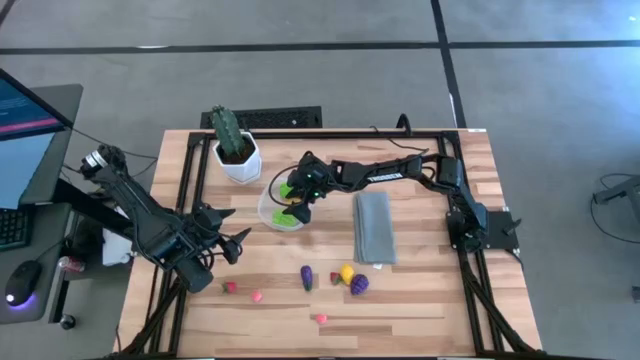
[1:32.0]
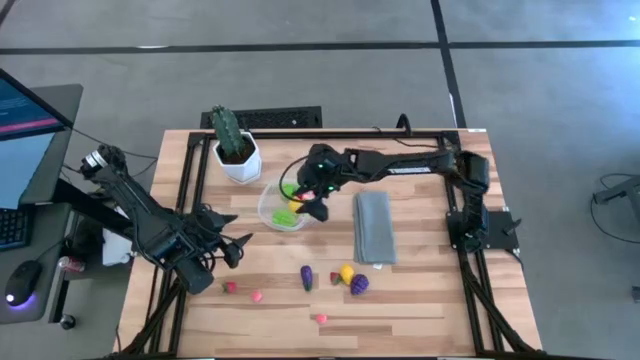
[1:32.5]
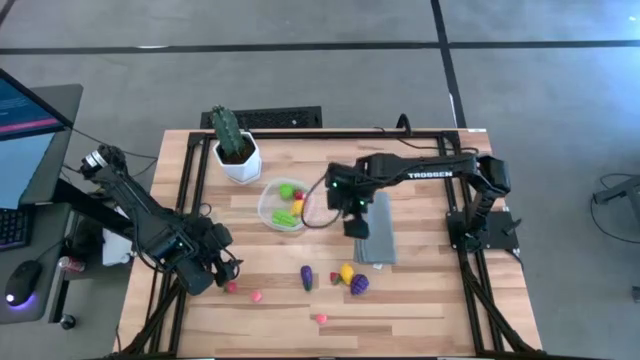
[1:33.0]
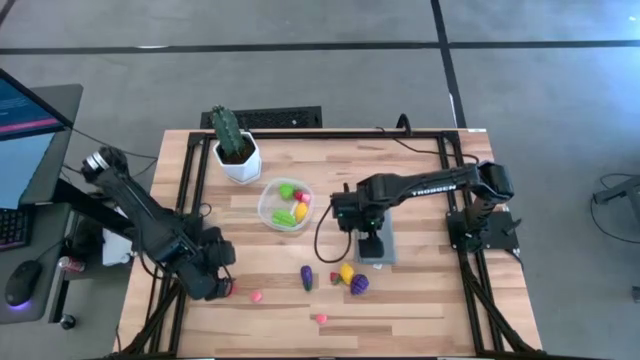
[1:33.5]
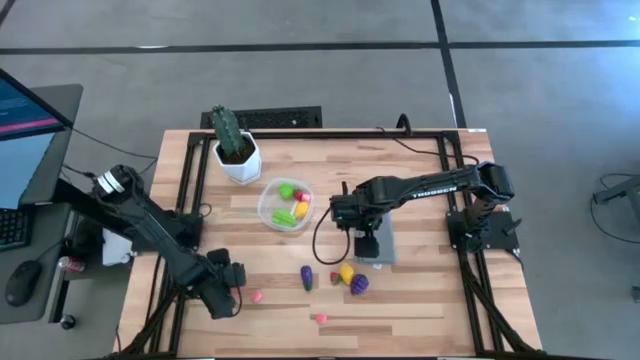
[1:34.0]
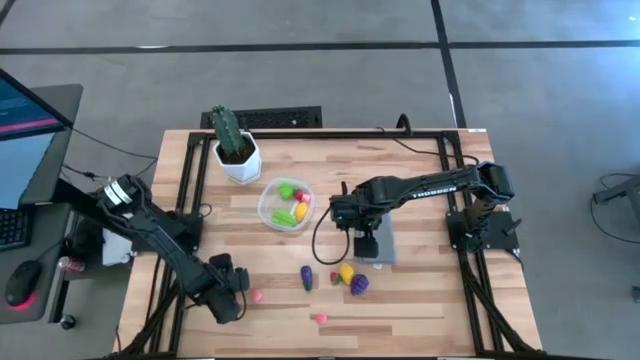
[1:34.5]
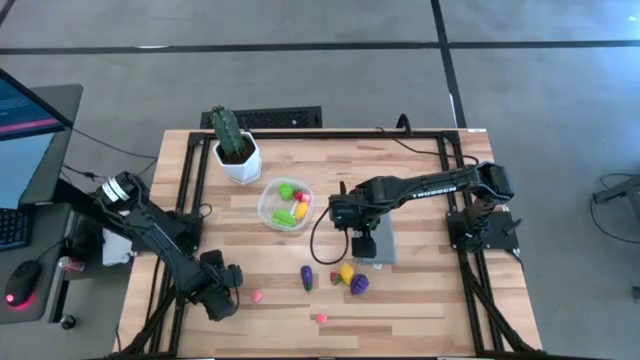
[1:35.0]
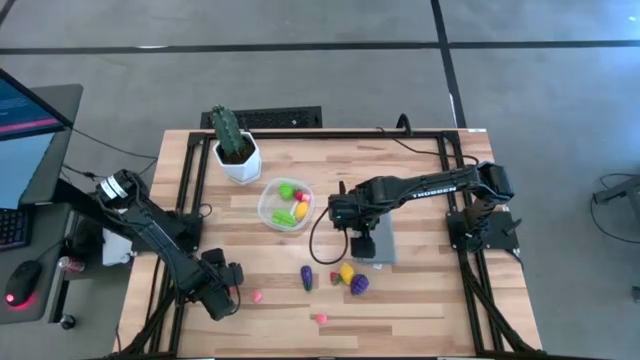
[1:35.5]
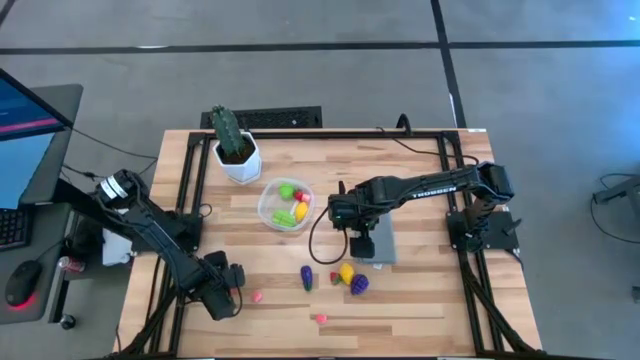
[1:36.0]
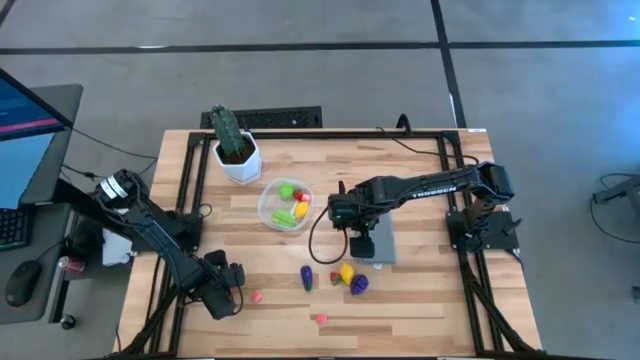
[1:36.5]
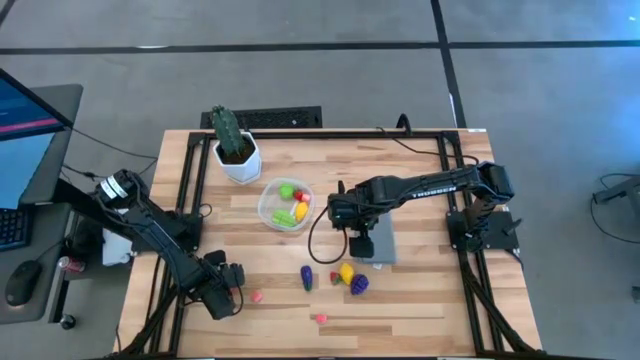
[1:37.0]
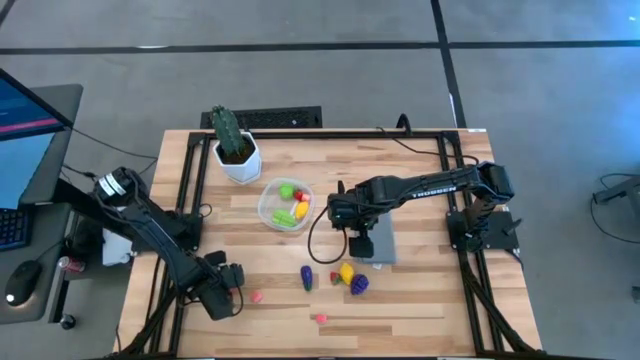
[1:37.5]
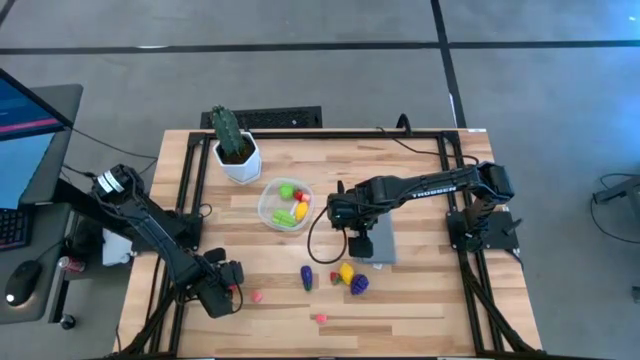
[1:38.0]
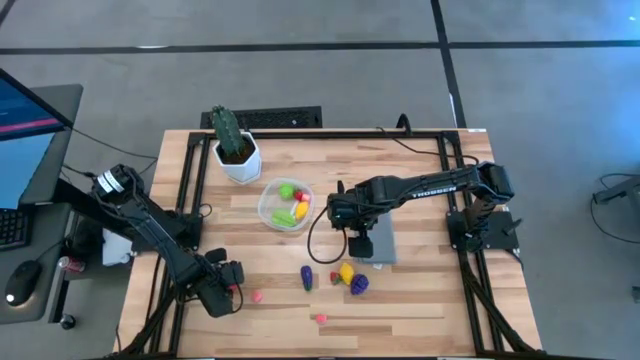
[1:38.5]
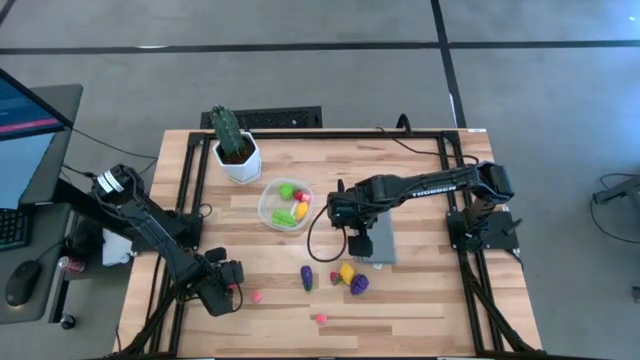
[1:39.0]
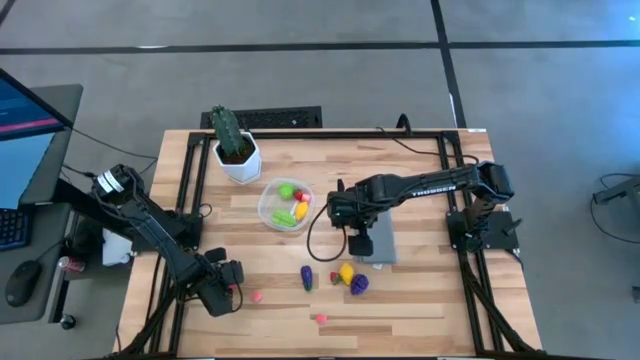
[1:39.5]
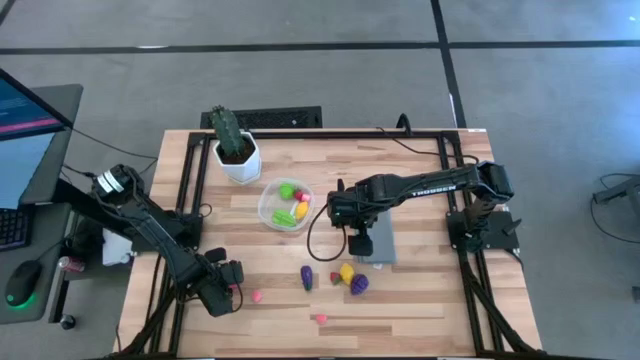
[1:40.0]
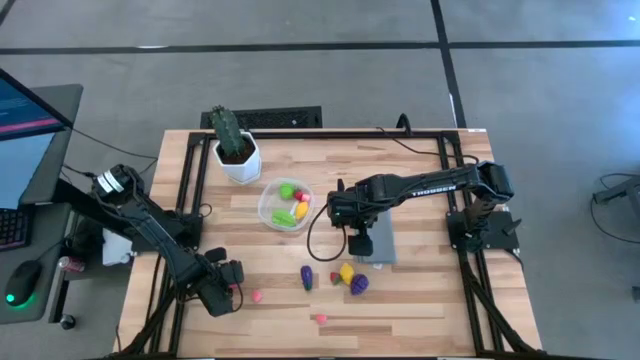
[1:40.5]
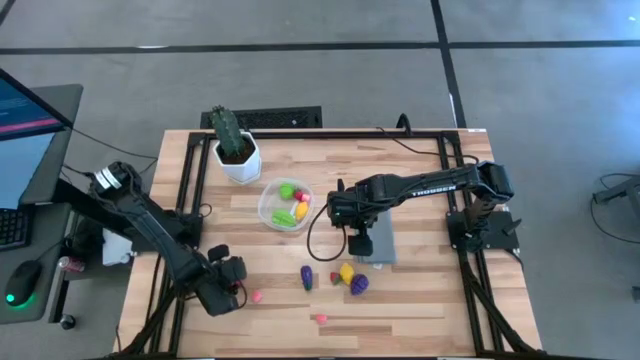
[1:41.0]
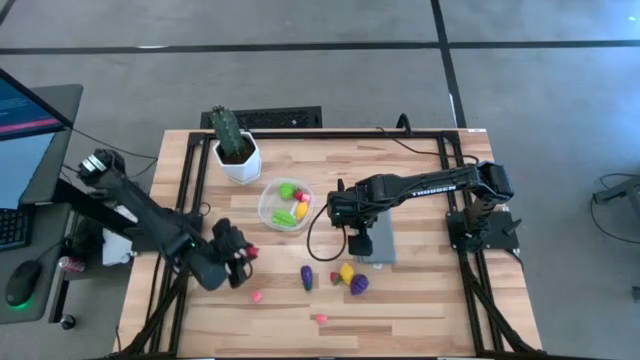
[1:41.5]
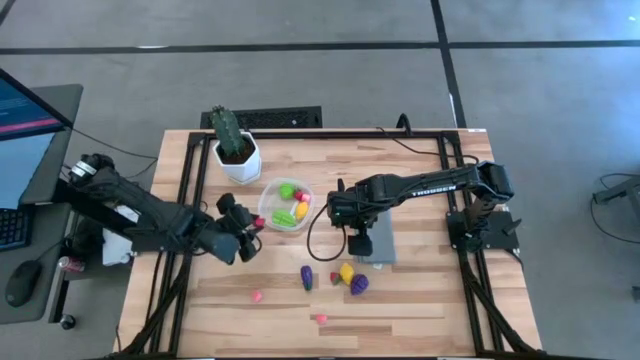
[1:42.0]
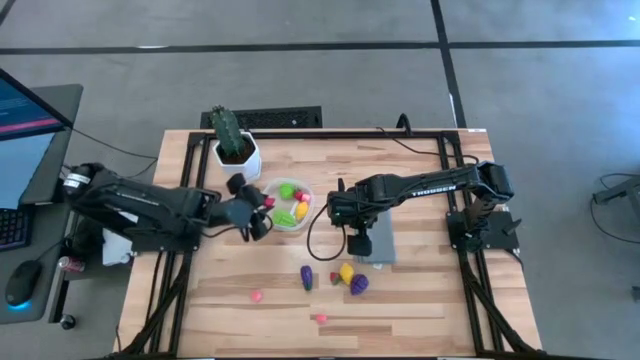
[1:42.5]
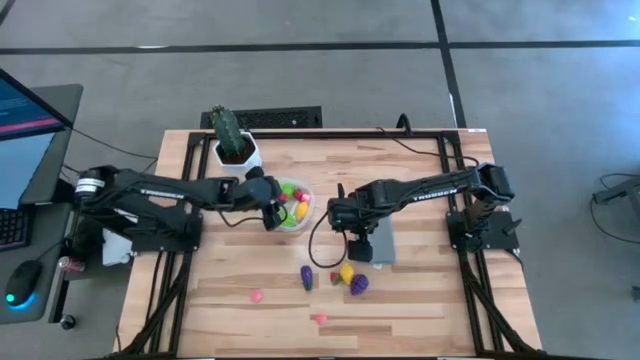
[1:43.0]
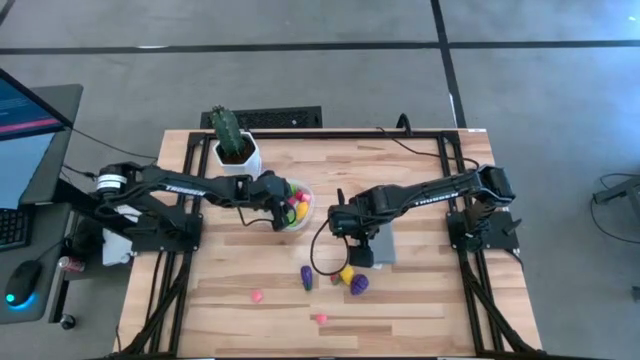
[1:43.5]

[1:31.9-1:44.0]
Task: Pick and placing Produce into tupperware
Put the left red strawberry into the transparent container

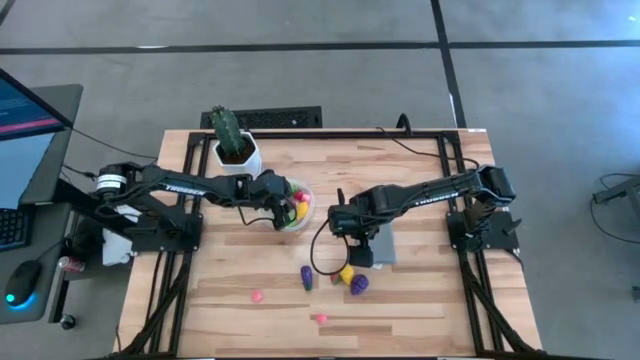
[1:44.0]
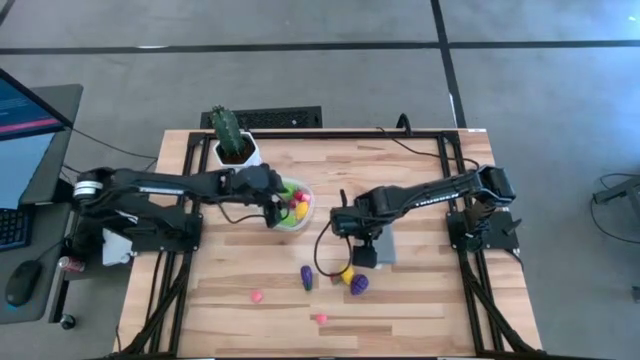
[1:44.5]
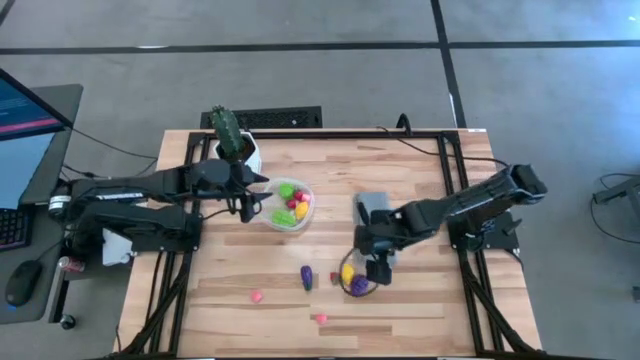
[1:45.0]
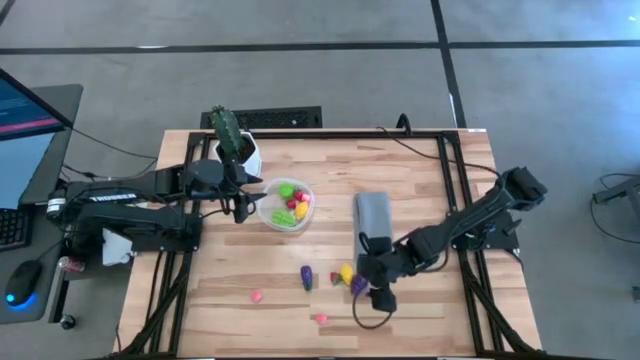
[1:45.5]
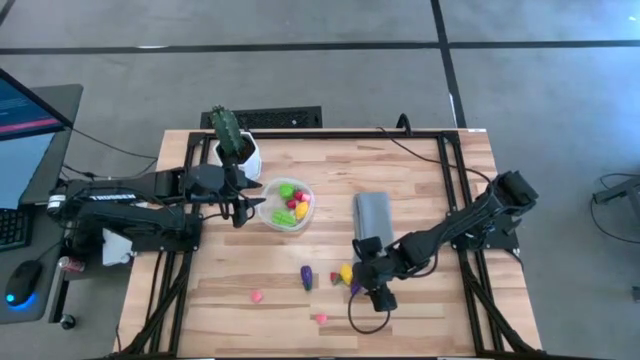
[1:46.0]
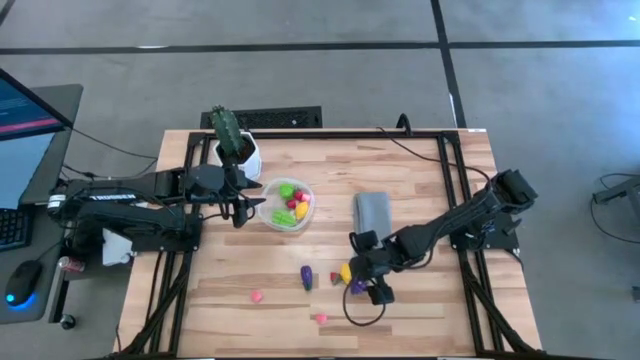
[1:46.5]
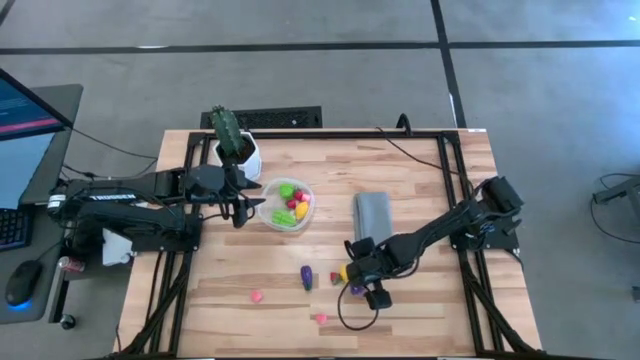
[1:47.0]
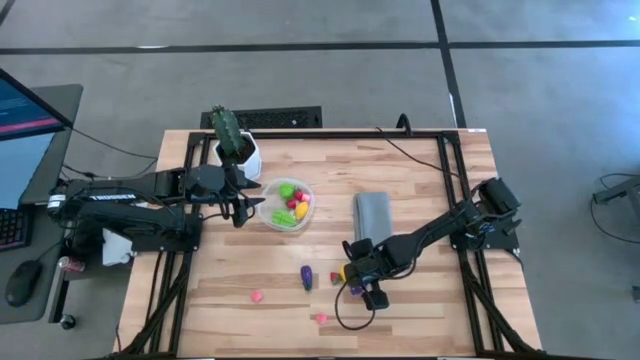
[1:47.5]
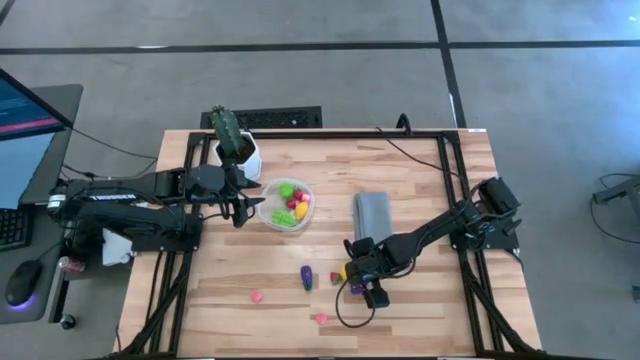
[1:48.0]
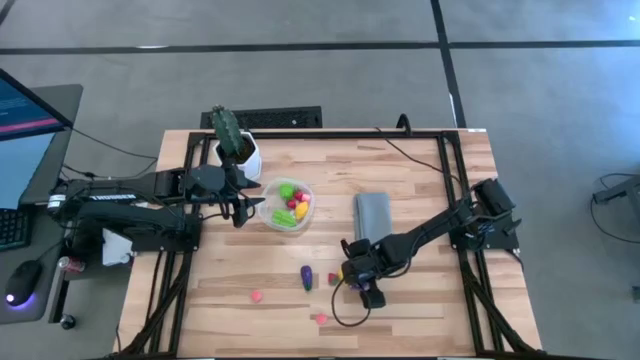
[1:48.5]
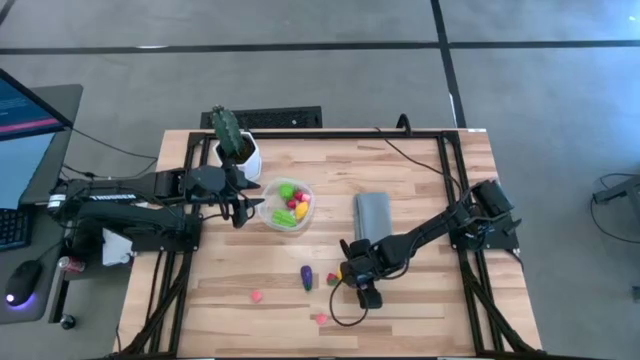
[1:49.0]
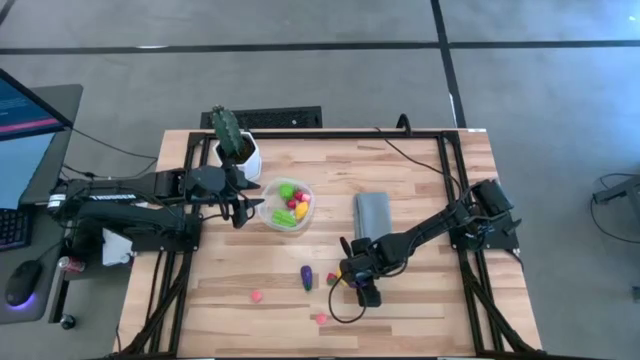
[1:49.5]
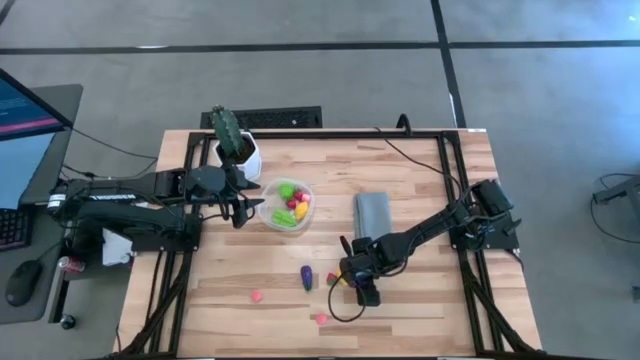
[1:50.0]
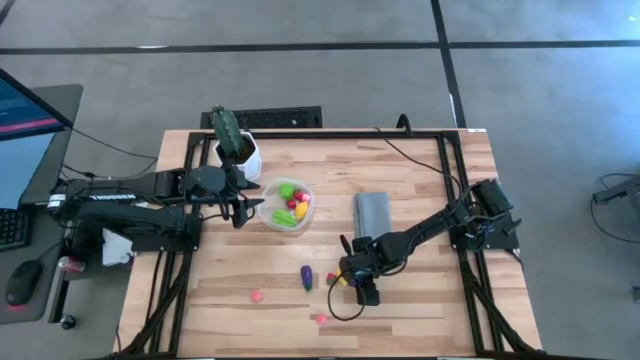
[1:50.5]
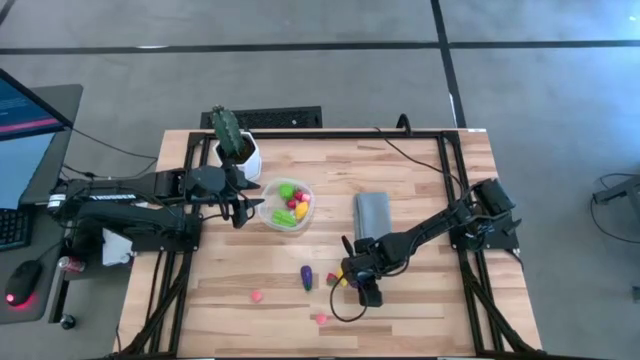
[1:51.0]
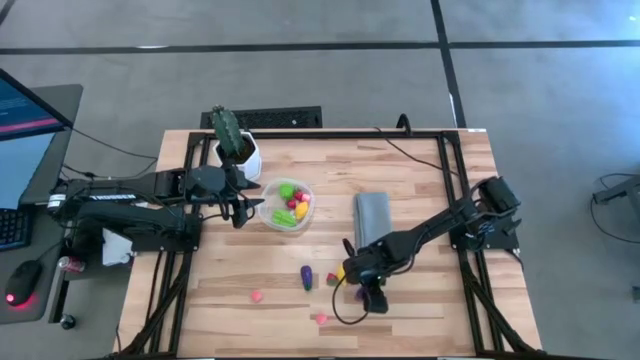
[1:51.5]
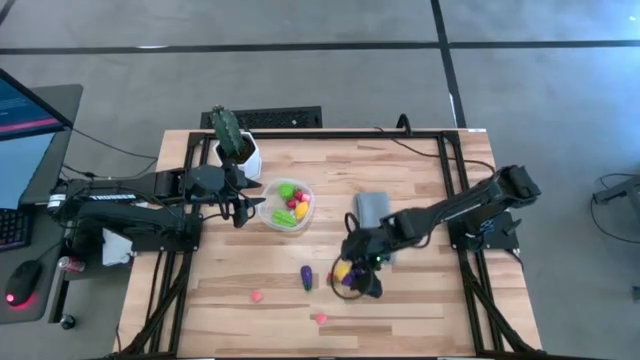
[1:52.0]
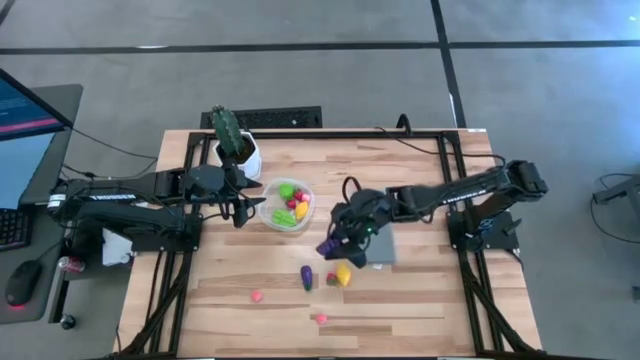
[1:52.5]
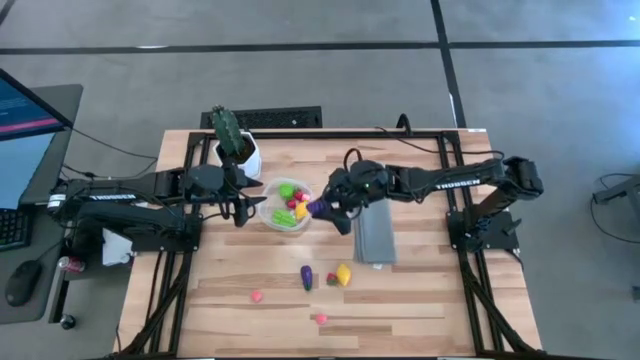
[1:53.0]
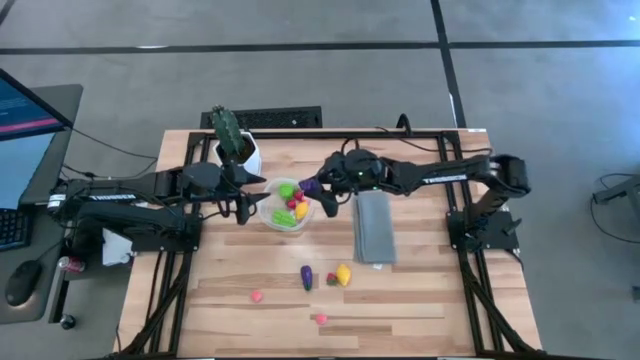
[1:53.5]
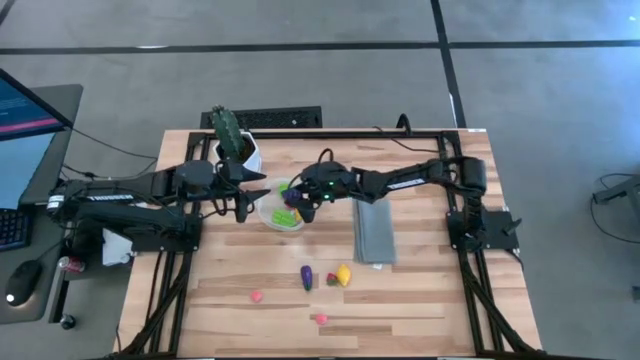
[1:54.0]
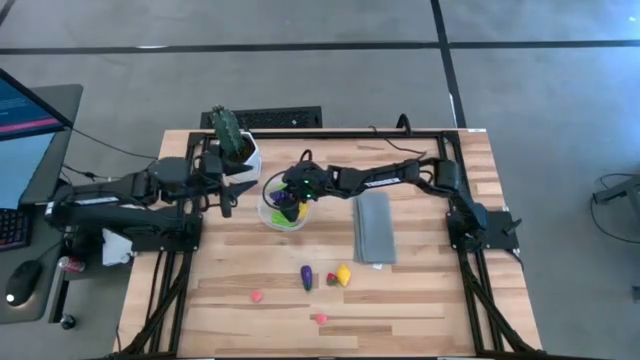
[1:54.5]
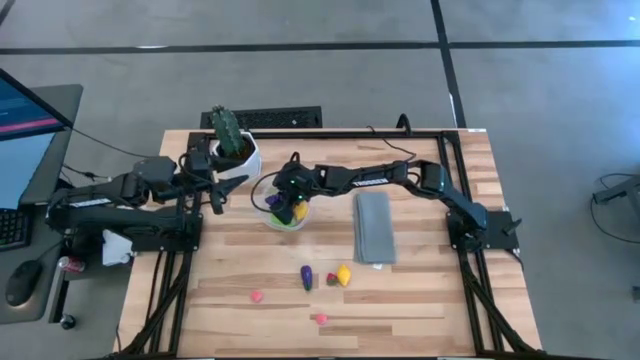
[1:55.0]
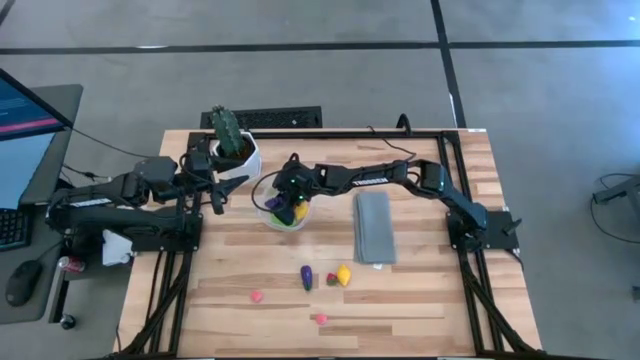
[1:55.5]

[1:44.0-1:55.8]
Put the blue grapes into the transparent container
